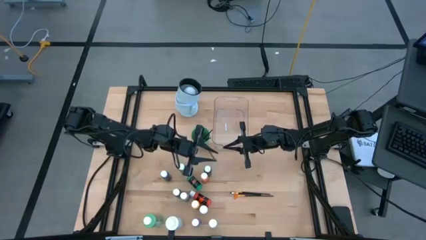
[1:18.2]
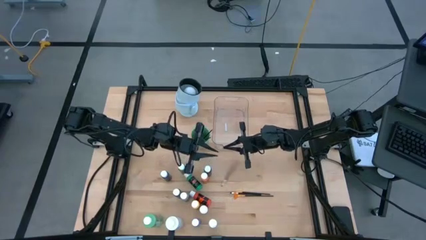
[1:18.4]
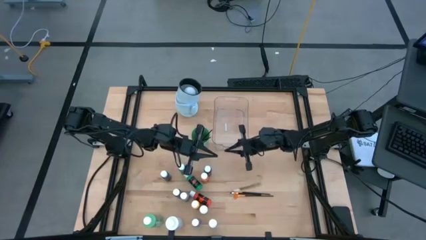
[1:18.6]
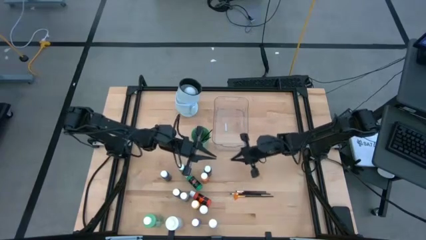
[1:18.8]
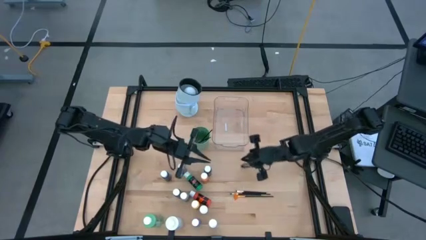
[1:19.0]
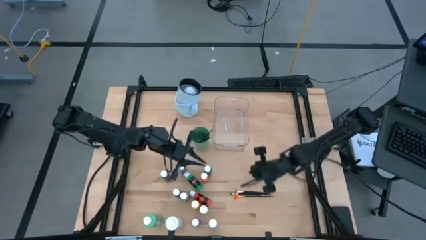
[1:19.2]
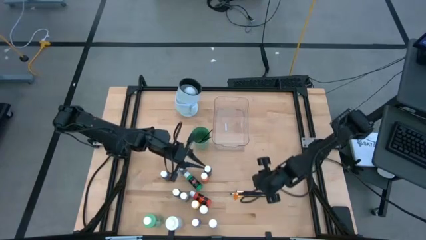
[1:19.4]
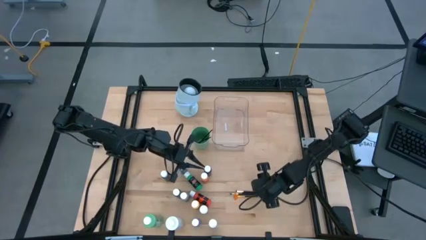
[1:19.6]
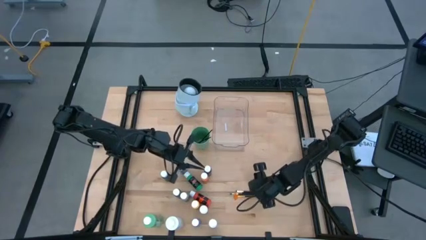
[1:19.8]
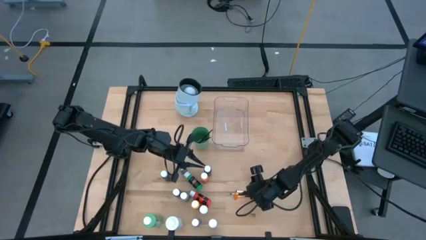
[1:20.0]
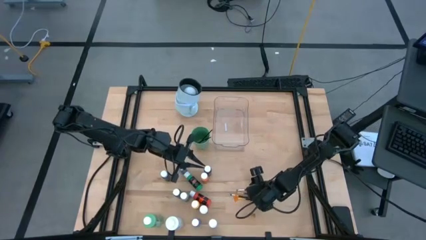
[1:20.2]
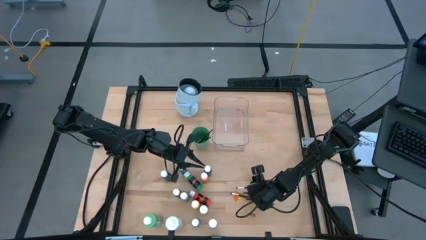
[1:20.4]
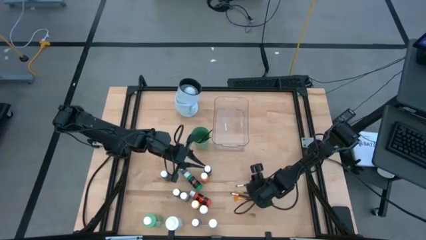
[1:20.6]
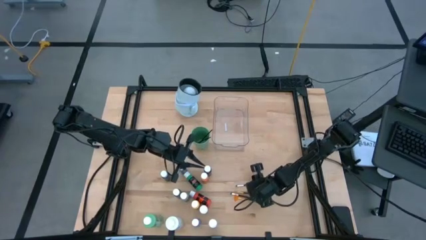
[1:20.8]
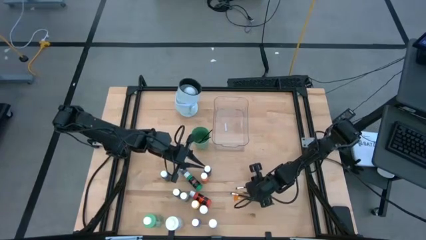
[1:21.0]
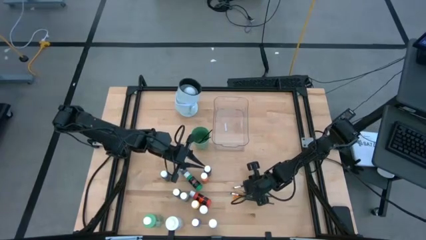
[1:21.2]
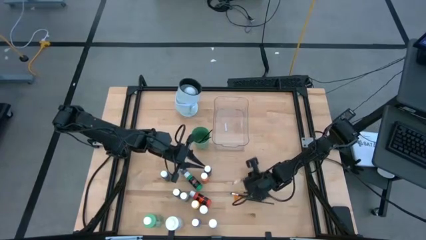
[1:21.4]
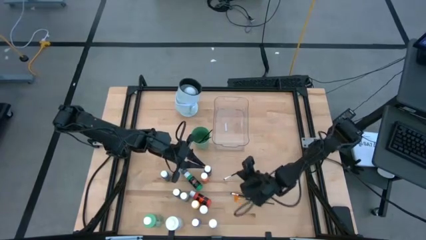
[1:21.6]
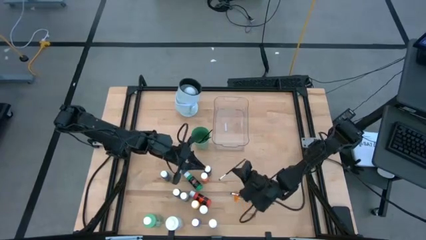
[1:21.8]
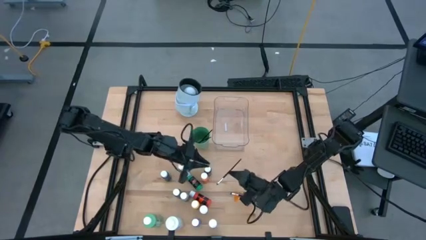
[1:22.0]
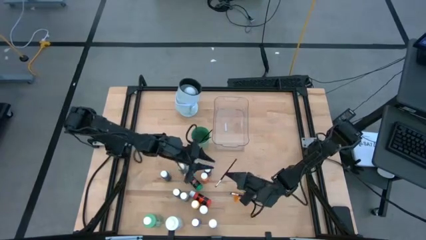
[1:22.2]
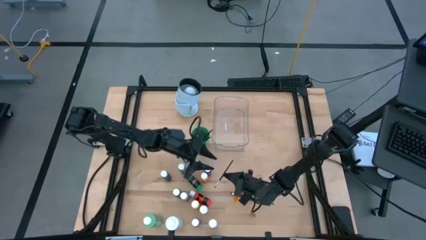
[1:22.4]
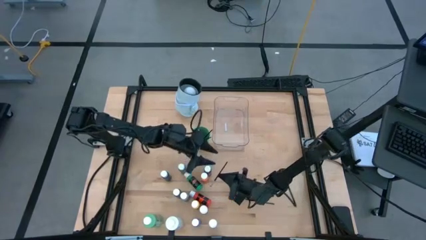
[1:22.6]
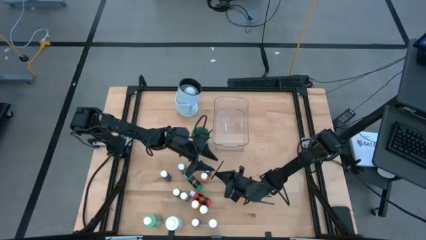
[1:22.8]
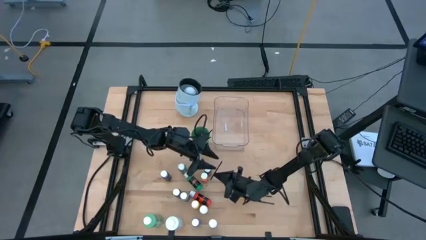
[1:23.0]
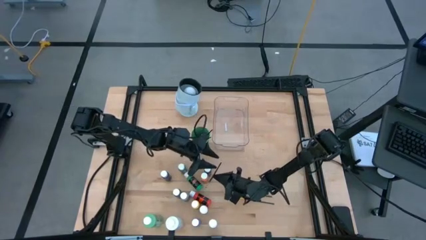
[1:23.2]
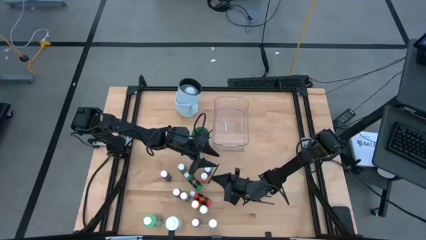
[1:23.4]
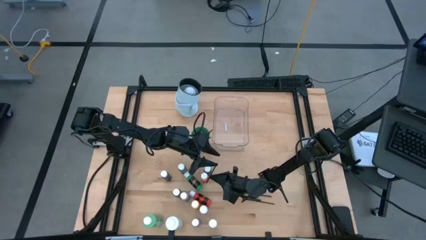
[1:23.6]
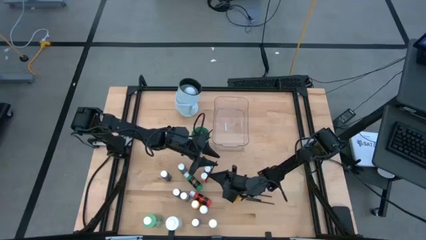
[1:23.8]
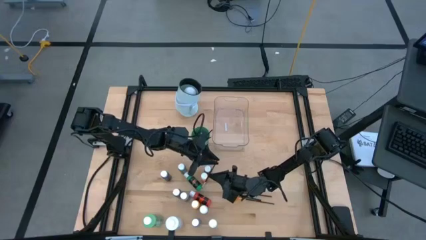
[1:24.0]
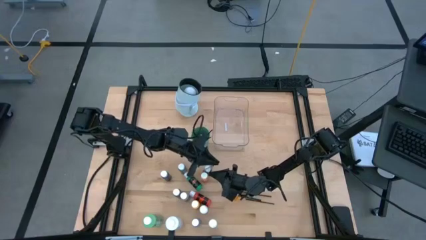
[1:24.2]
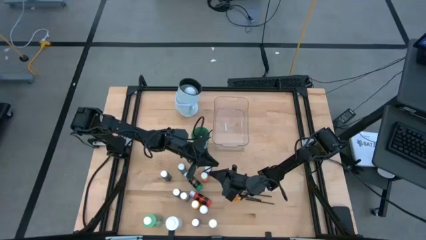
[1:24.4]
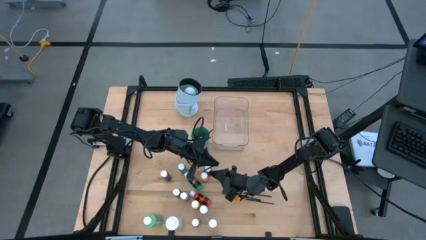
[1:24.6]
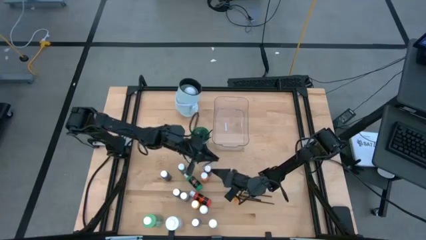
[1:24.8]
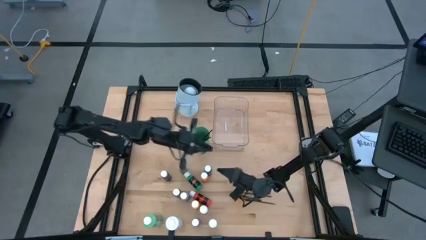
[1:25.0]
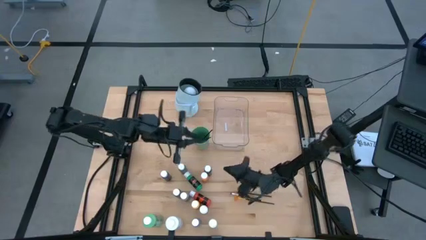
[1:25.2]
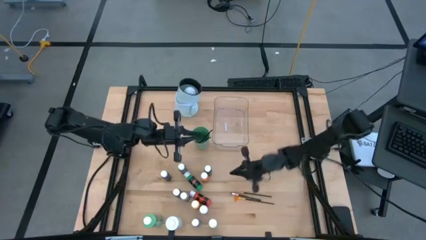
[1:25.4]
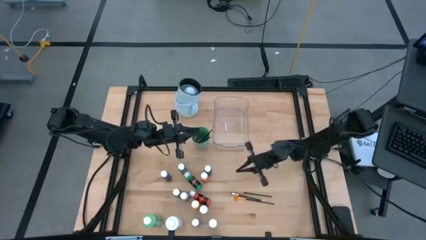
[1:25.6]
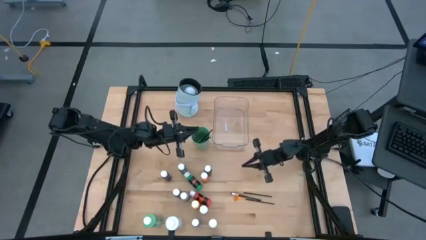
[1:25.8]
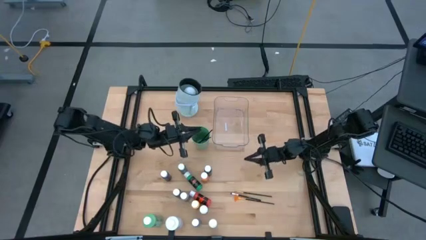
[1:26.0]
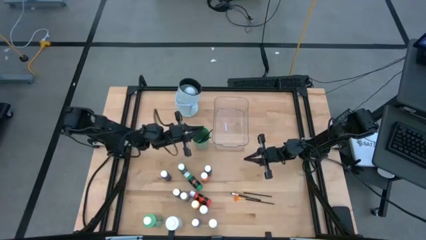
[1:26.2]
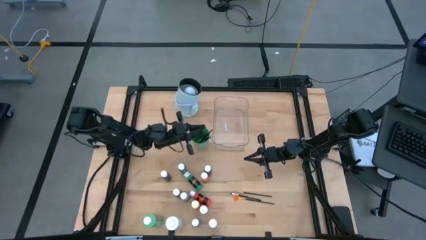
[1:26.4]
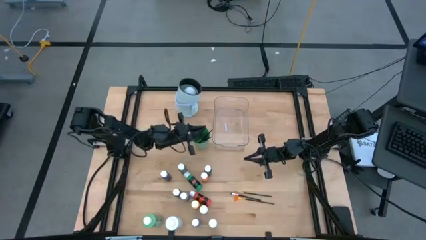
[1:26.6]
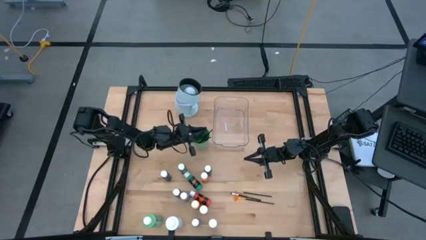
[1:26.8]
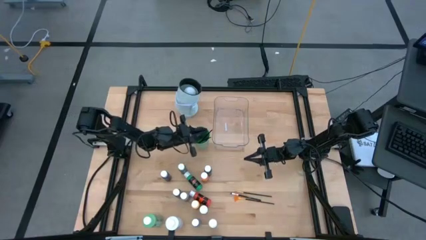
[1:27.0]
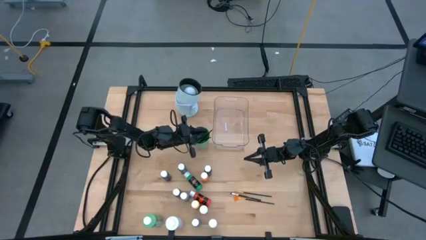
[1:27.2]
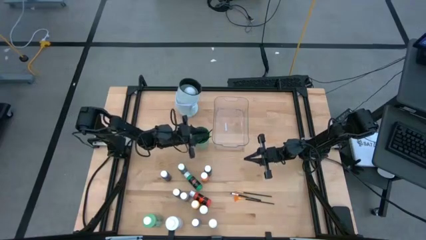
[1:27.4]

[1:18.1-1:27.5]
Task: Pick & Place Paint Supplies
Put the white paintbrush into the green cup

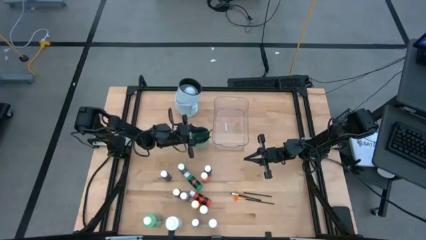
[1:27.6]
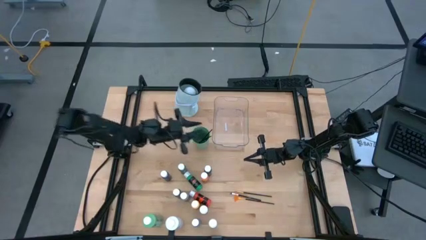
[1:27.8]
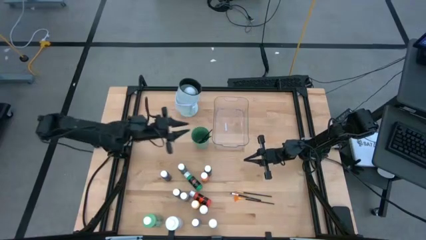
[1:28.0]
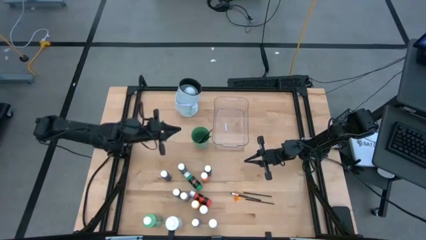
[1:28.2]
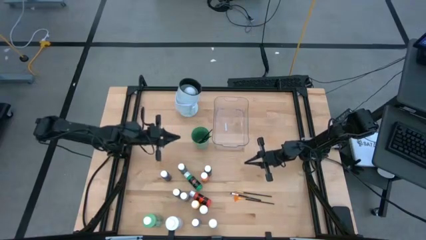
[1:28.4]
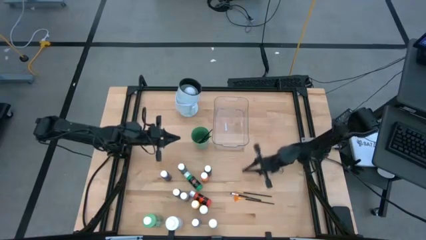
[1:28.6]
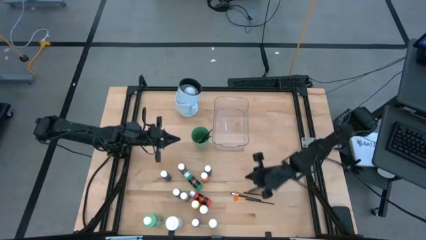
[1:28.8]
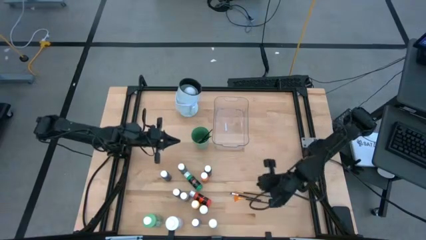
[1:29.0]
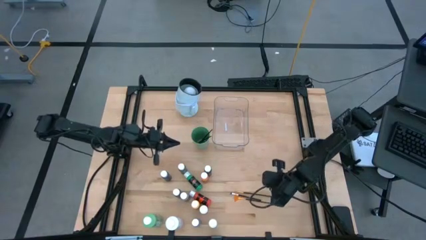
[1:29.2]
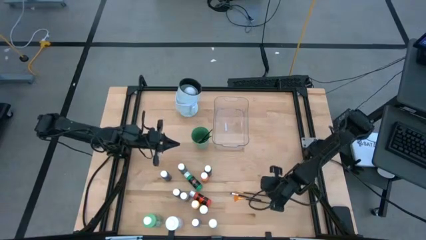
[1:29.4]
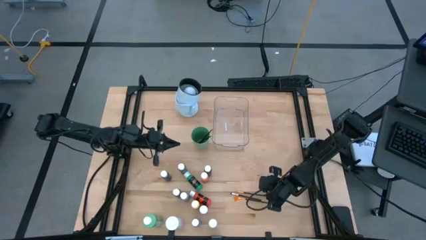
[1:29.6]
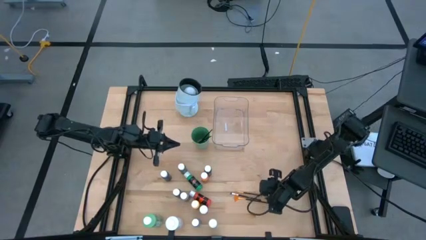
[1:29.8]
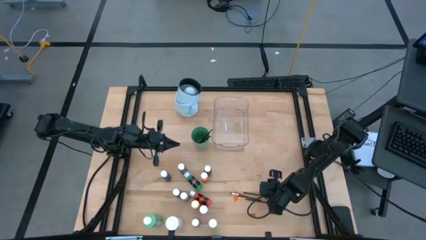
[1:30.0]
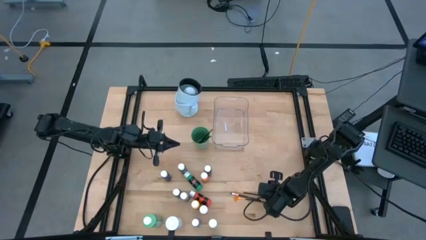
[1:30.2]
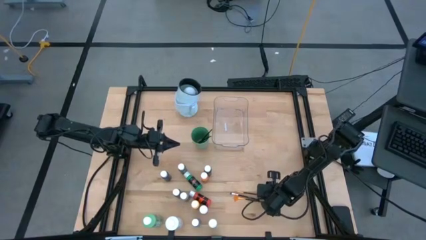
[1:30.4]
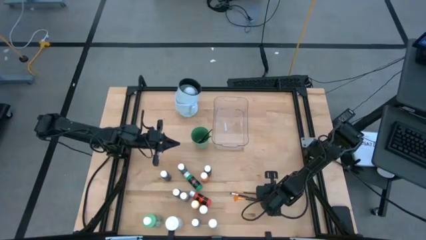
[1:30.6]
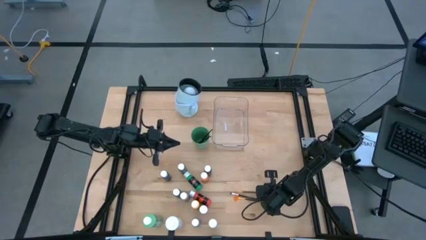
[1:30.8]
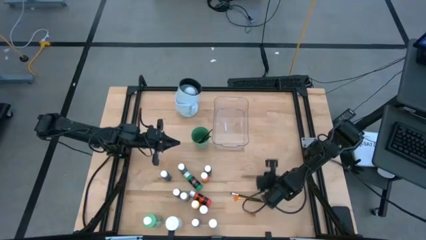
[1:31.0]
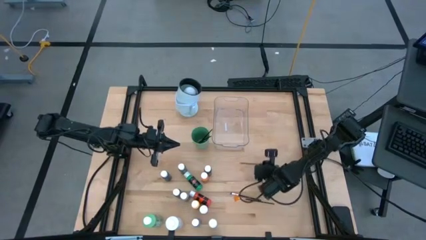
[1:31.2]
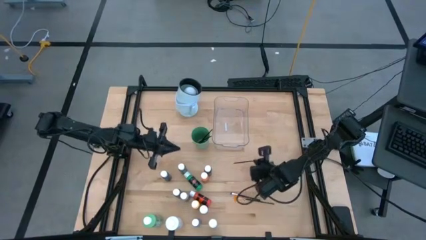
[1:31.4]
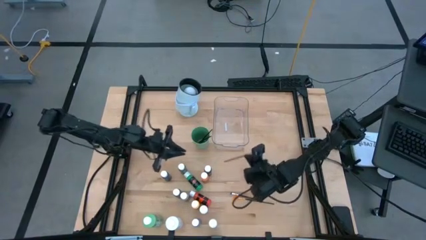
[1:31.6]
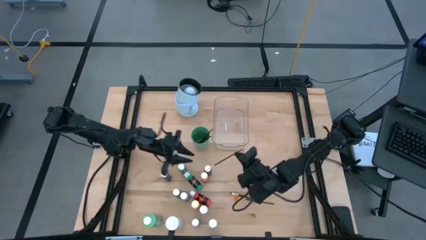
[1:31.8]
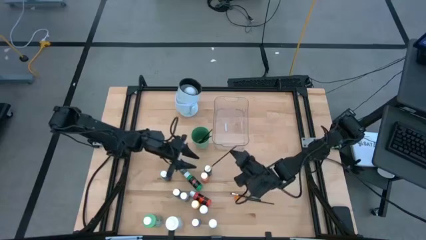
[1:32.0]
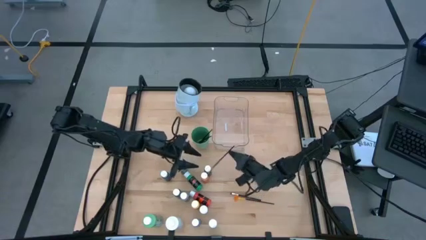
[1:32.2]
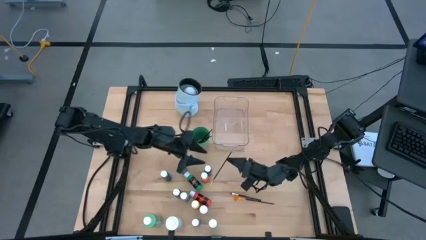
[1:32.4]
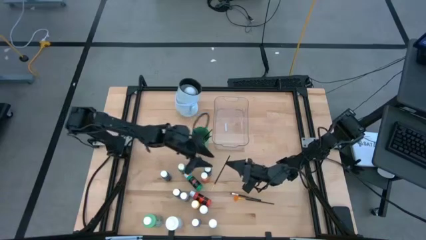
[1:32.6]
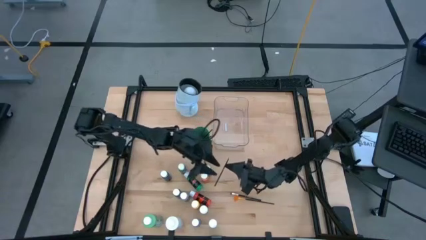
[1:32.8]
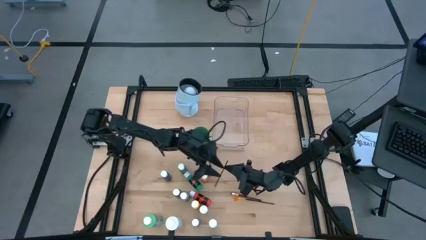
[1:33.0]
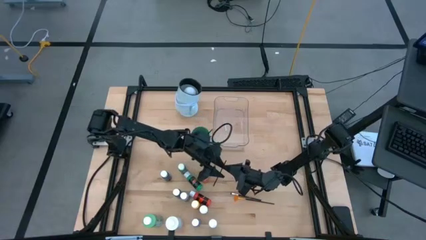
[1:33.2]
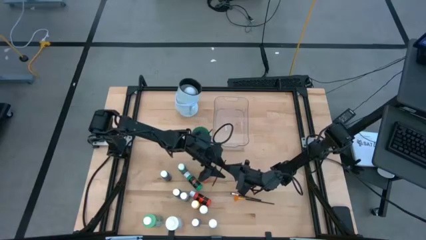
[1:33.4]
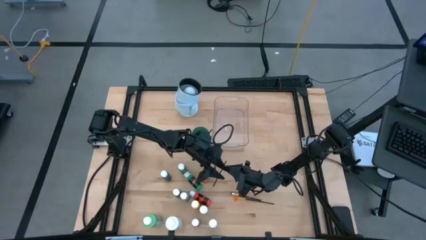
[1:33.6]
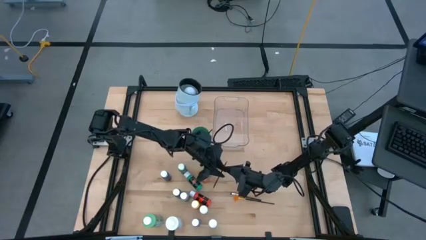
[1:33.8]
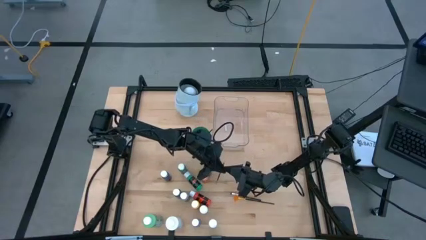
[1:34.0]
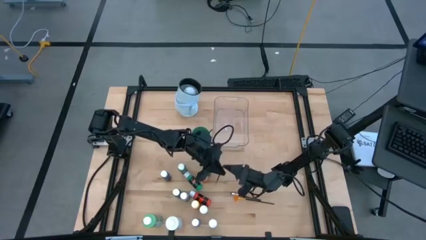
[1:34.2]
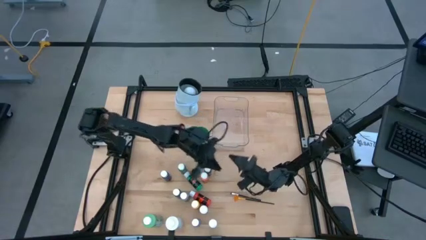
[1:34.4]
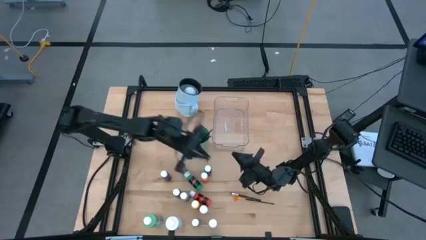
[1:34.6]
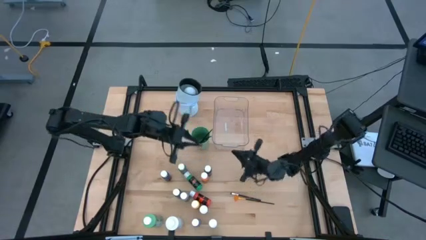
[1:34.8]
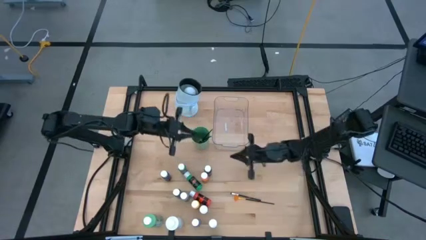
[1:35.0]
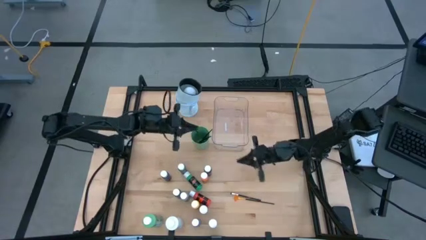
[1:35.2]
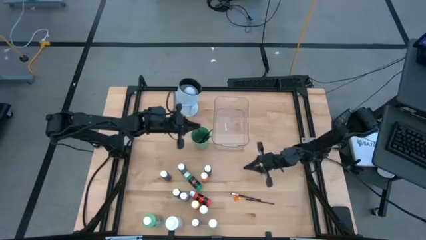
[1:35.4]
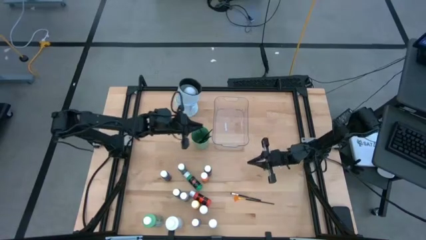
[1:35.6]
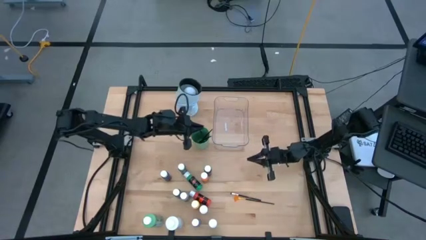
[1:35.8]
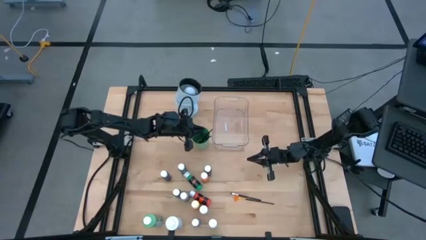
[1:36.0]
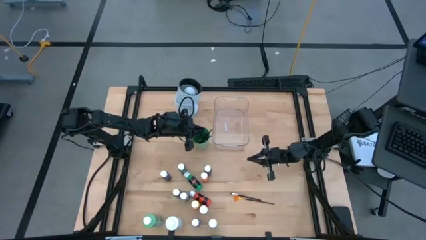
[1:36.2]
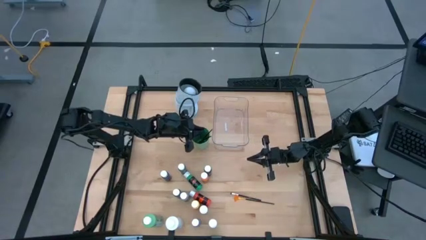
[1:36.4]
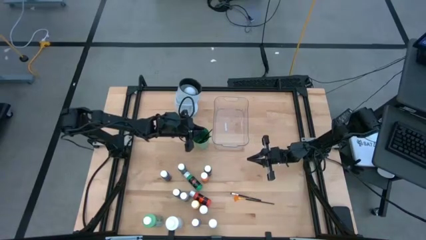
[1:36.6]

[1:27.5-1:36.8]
Put the yellow paintbrush into the green cup
